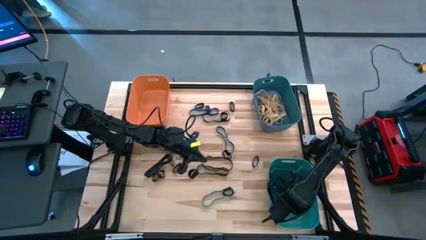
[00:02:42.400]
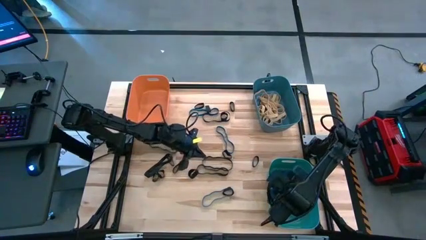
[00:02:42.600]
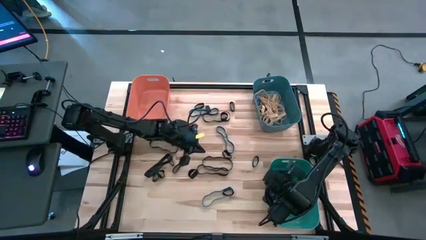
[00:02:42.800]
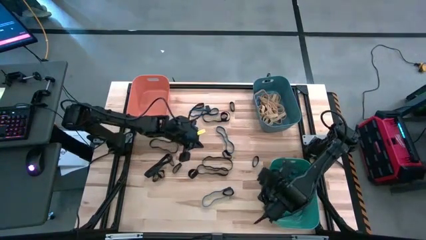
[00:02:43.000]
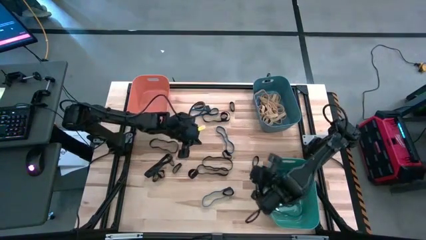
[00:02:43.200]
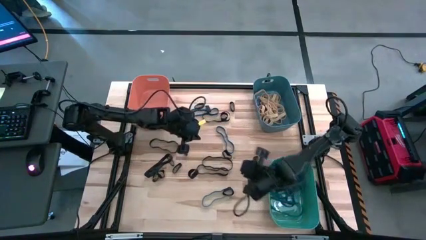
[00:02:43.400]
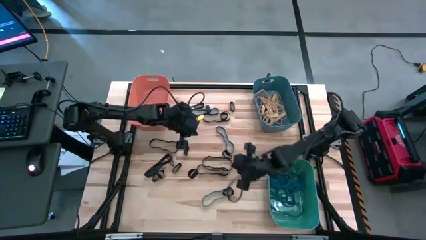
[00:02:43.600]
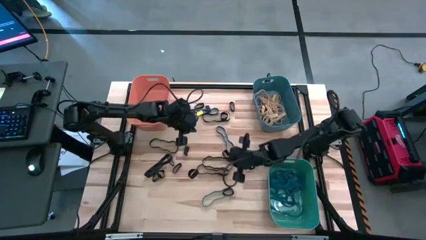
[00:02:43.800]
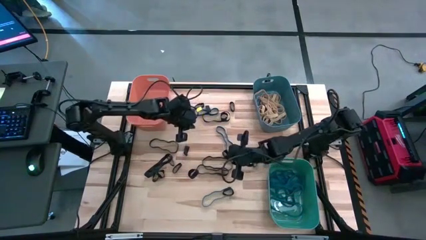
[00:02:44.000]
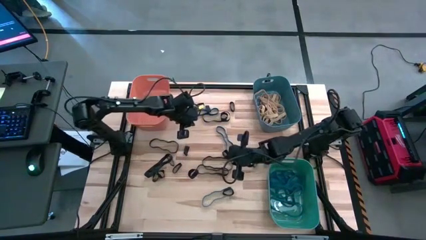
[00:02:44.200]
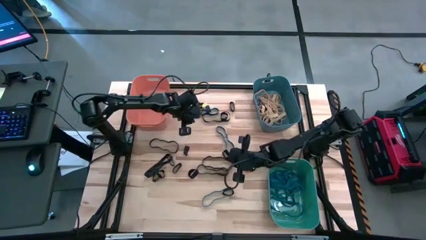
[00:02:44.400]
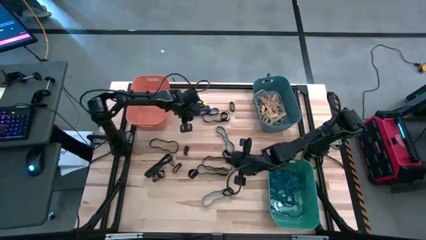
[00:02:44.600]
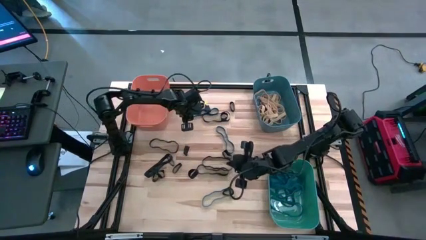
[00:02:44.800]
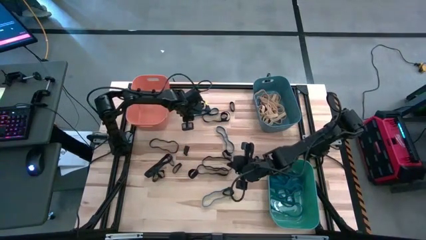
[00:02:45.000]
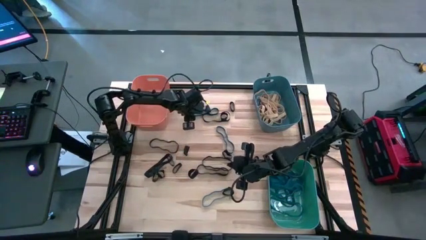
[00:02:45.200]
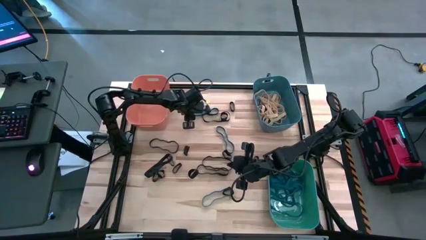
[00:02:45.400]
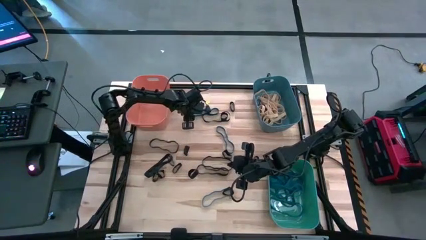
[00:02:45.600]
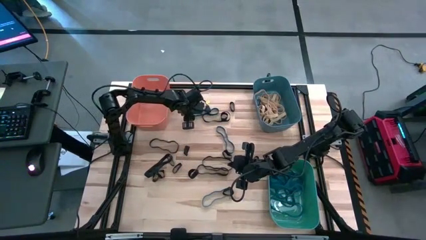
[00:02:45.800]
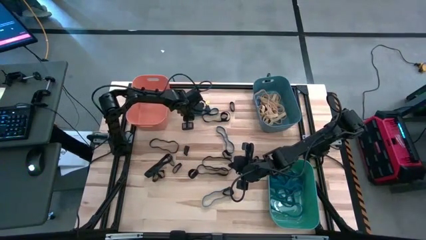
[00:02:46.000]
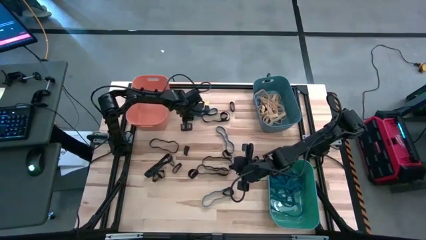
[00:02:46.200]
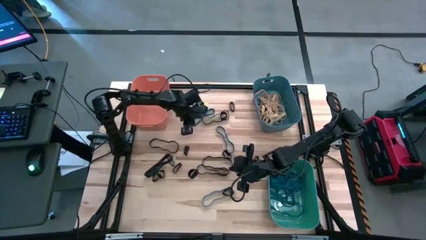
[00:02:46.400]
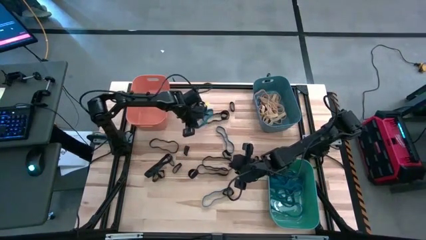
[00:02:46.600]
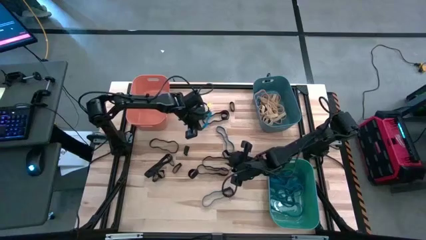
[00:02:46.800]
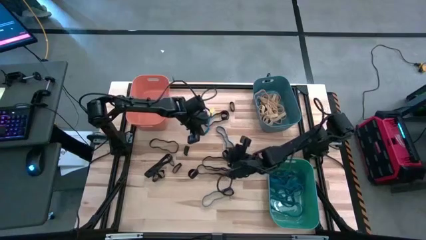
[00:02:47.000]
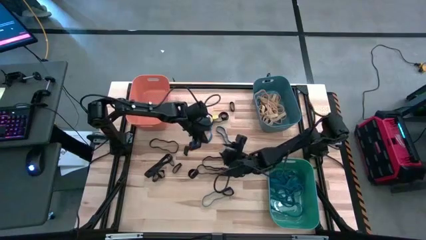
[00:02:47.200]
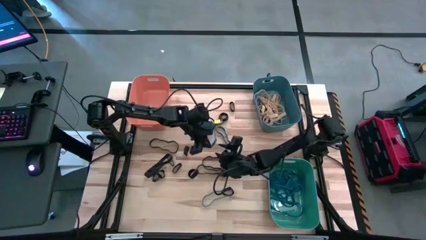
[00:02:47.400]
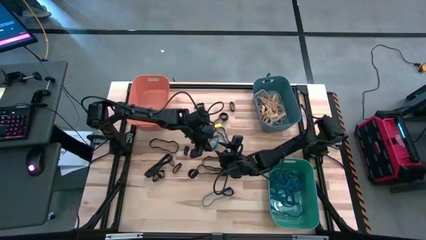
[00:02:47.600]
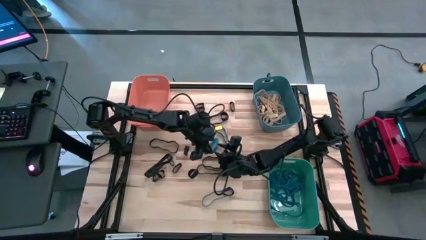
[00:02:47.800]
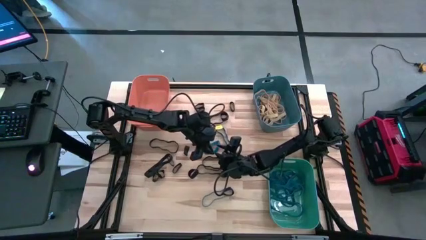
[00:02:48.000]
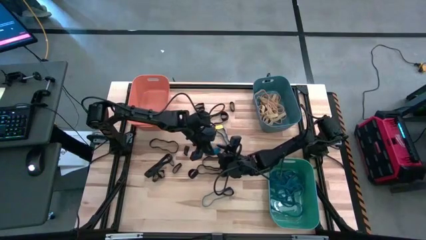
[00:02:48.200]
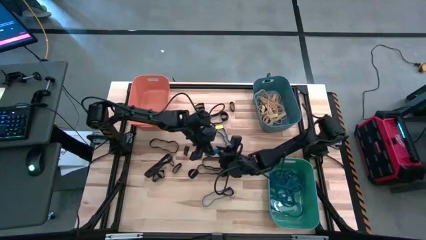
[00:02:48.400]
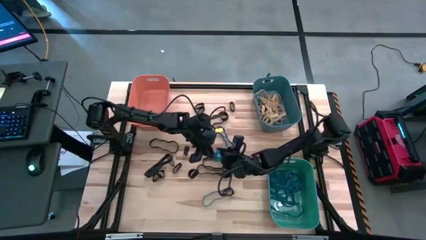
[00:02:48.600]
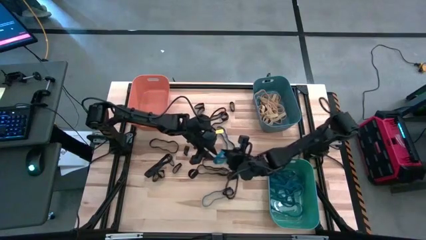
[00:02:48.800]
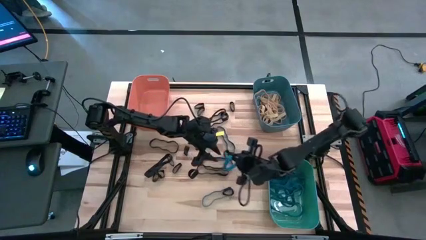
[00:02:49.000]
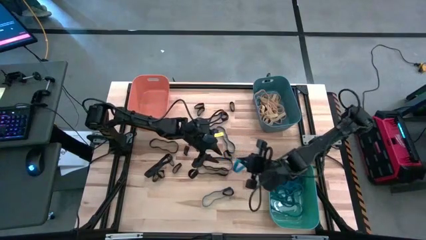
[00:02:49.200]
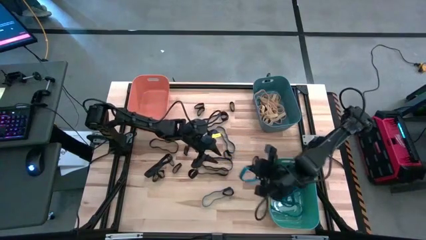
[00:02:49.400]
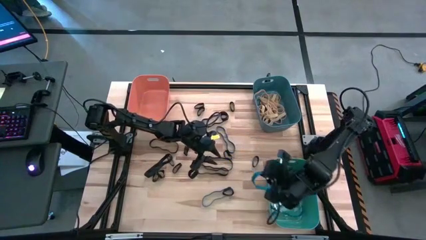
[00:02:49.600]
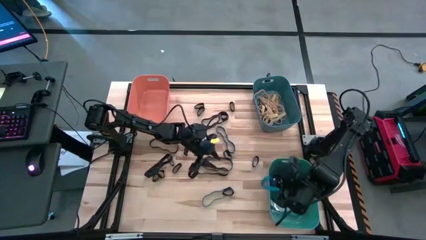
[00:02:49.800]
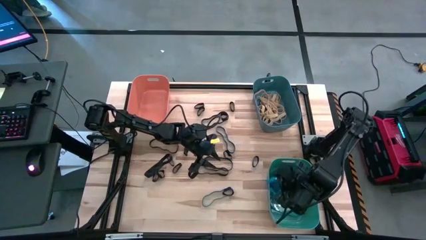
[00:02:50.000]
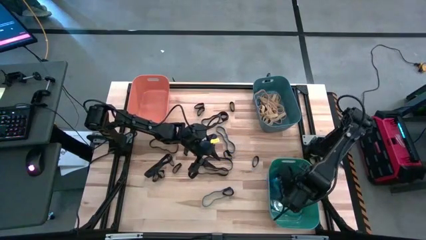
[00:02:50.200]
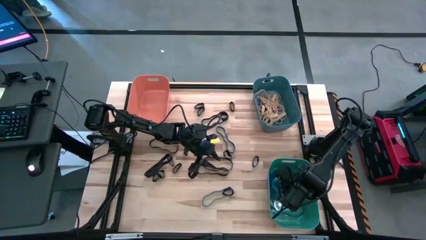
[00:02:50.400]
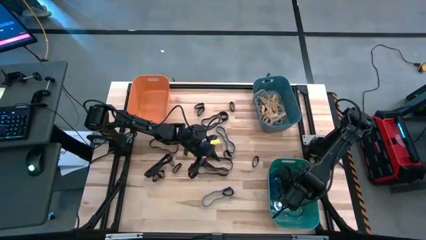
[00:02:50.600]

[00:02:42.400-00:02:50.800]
Task: Sort rubber bands into baskets
Put the blue rubber band into the green bin

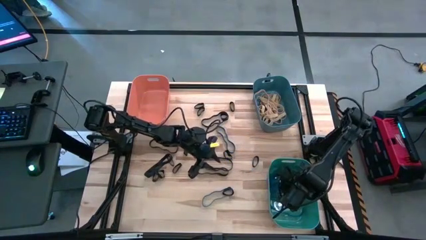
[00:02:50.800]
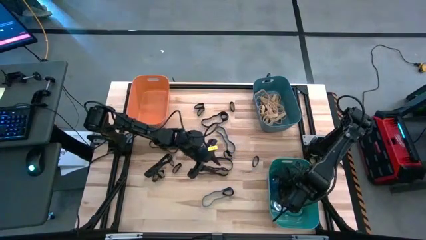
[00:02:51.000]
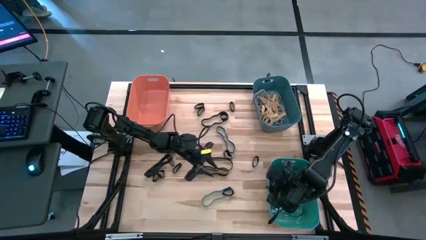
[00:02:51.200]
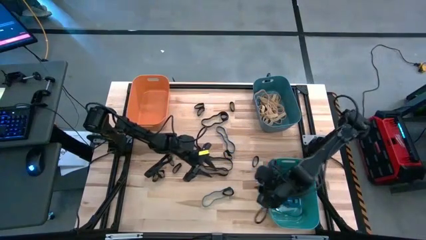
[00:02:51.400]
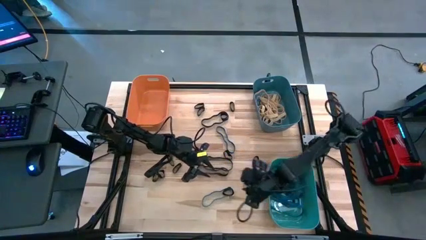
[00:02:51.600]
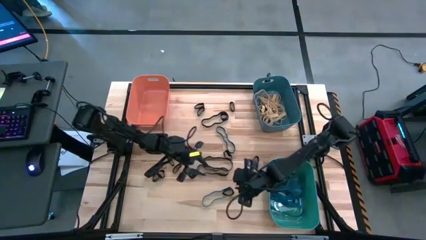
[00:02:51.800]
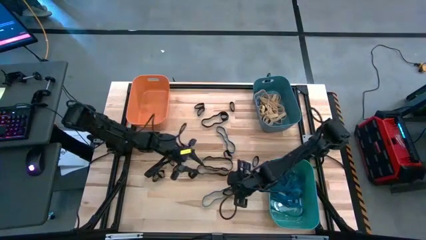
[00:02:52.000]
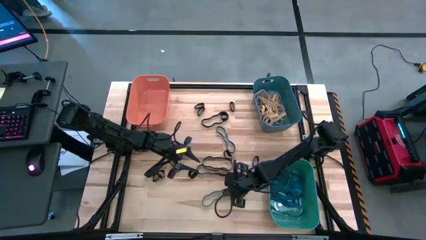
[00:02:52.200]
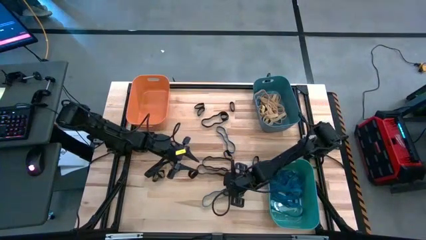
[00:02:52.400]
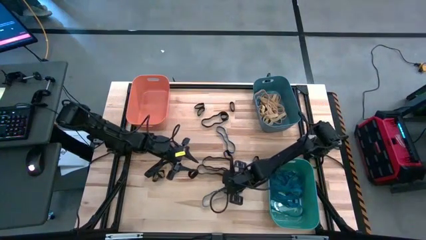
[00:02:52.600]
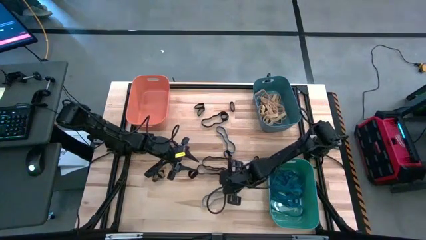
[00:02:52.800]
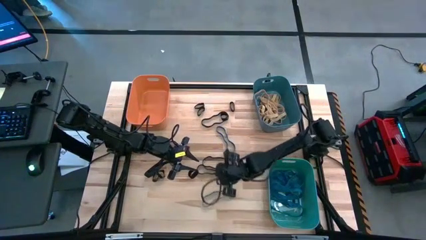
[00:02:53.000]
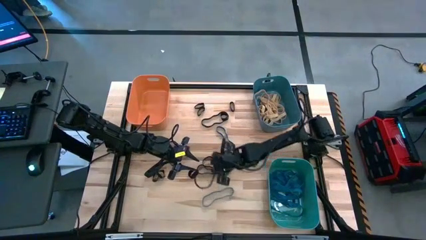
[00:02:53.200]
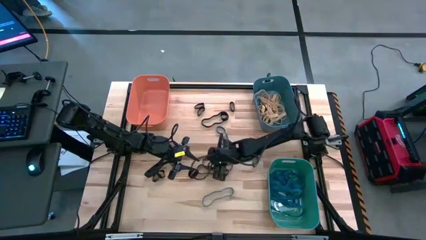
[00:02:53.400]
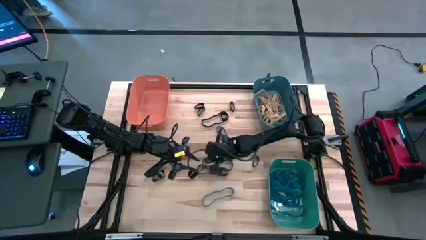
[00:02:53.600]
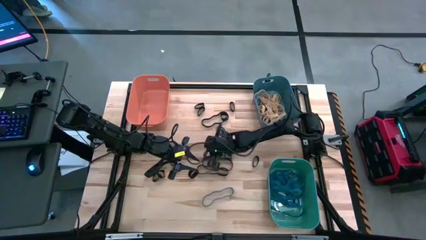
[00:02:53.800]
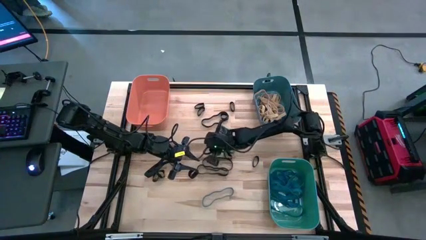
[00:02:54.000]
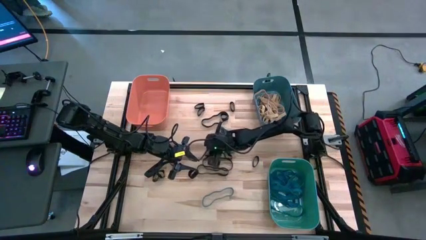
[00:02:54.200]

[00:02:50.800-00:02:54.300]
Move the black rubber band to the center of the table

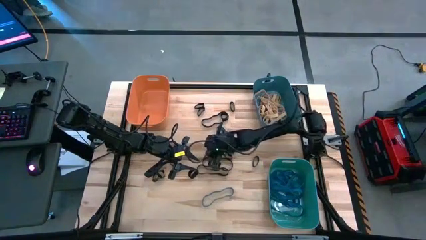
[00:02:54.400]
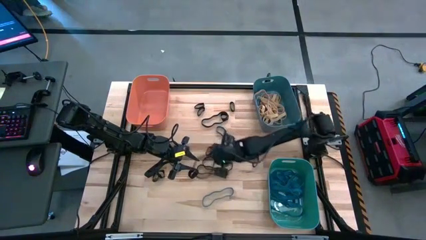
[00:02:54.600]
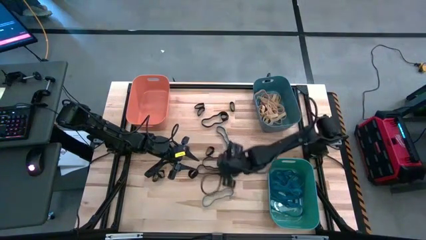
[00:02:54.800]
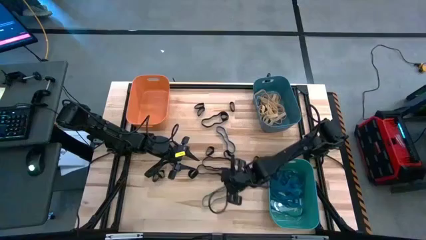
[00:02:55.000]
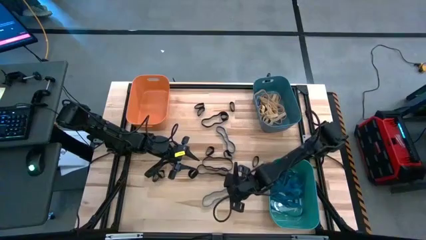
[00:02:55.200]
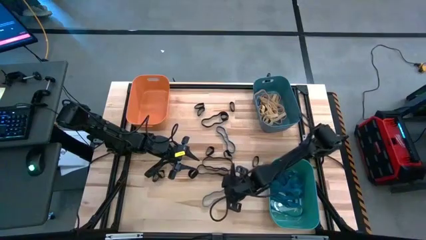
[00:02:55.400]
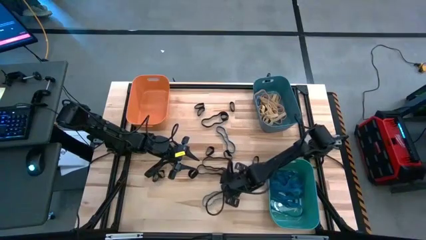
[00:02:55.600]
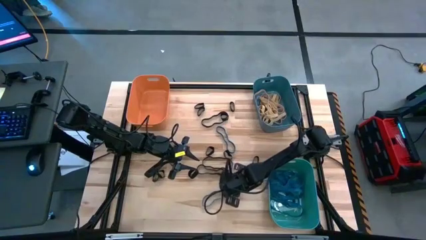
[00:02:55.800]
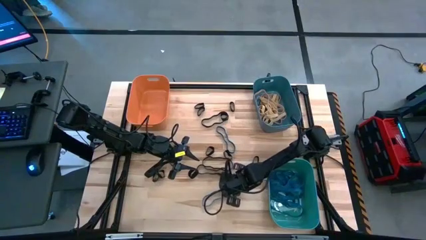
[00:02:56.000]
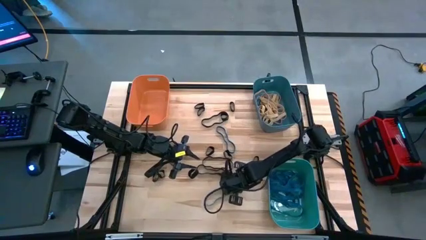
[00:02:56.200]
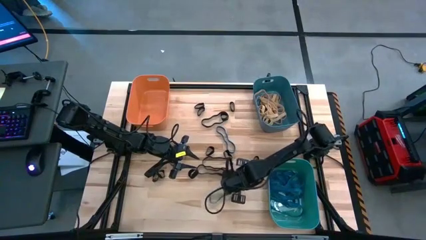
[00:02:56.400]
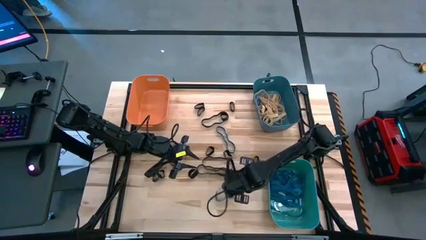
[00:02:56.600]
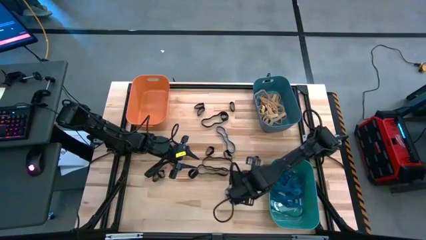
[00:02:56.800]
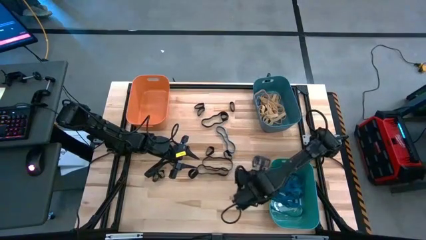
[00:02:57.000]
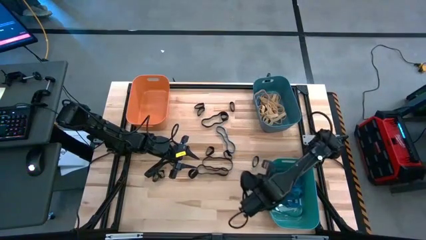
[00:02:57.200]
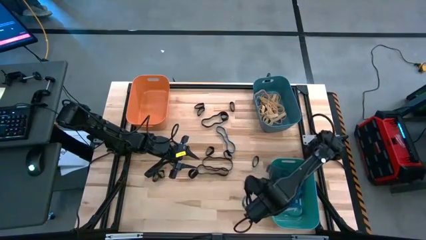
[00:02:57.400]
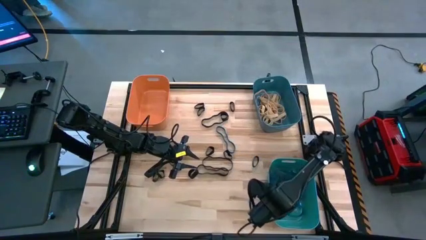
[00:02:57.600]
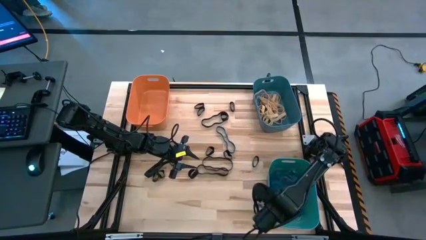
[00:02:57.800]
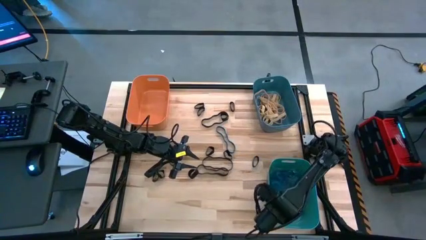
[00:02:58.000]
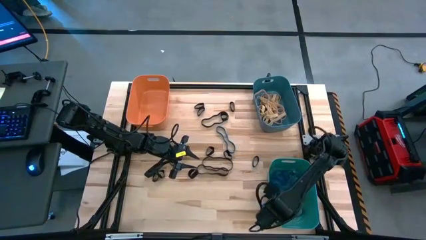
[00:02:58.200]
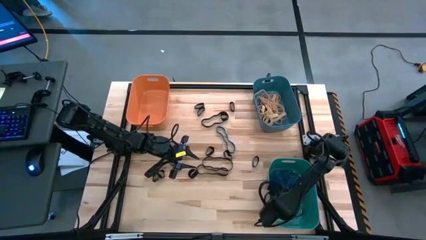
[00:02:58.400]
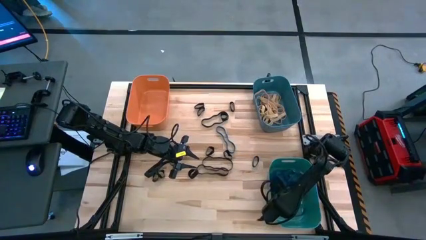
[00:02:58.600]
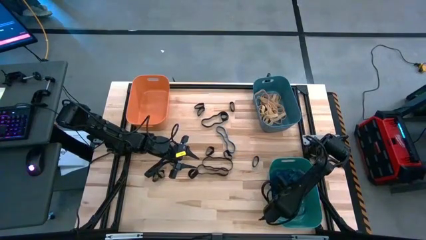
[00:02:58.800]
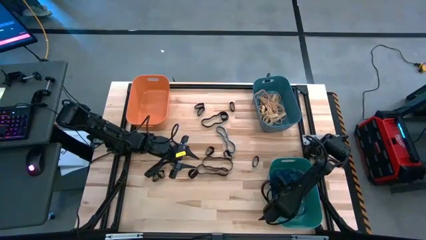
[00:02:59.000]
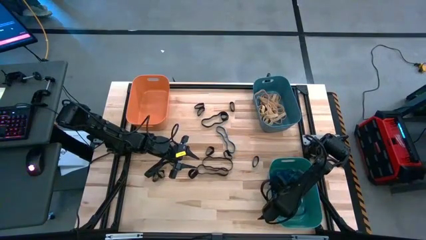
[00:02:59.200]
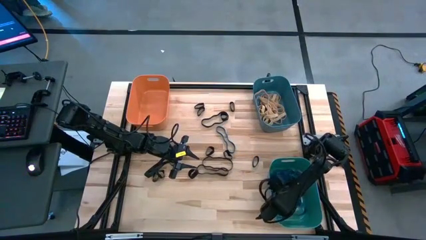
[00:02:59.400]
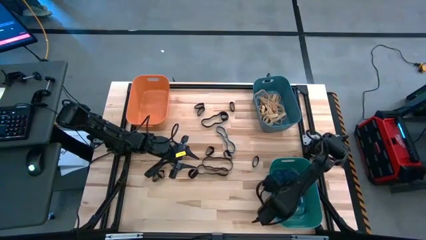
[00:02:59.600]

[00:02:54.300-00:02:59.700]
Put the blue rubber band into the green bin
